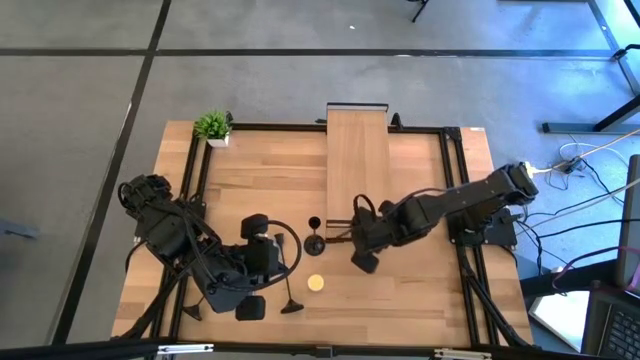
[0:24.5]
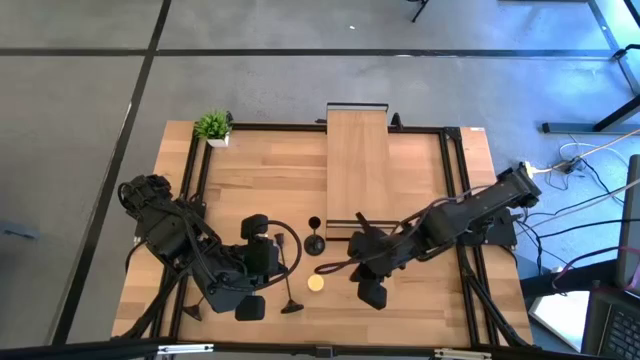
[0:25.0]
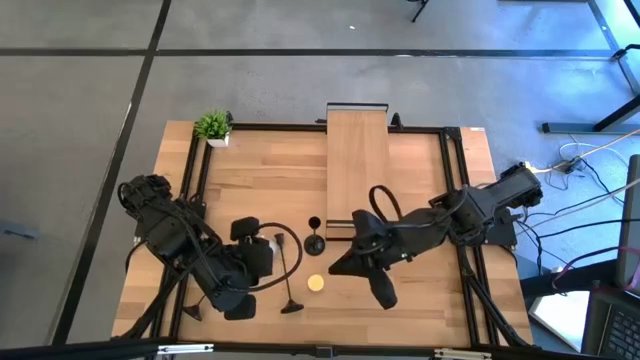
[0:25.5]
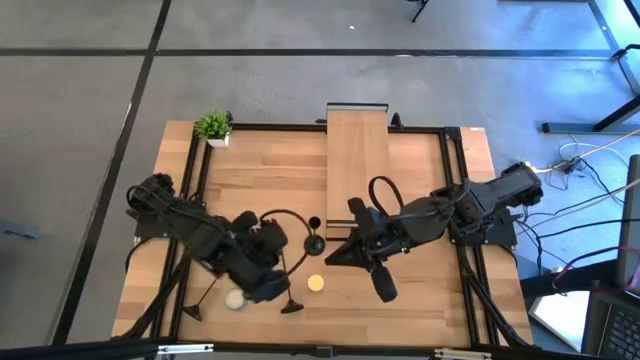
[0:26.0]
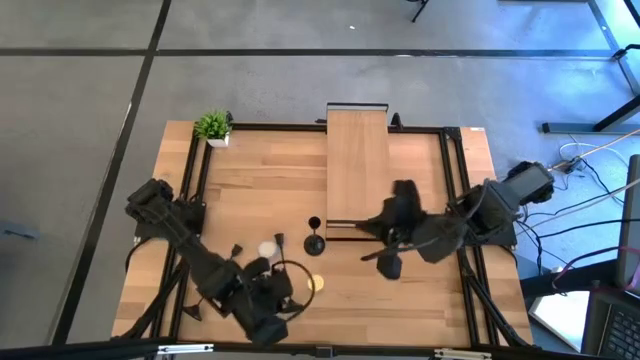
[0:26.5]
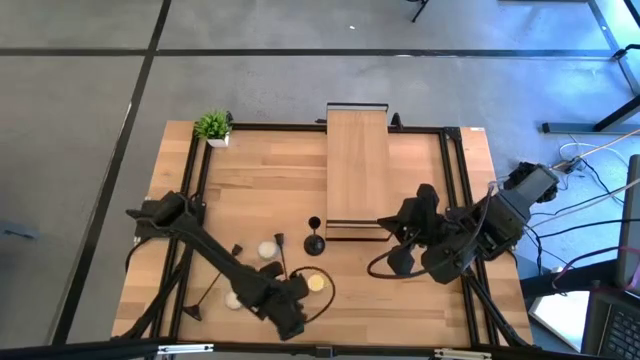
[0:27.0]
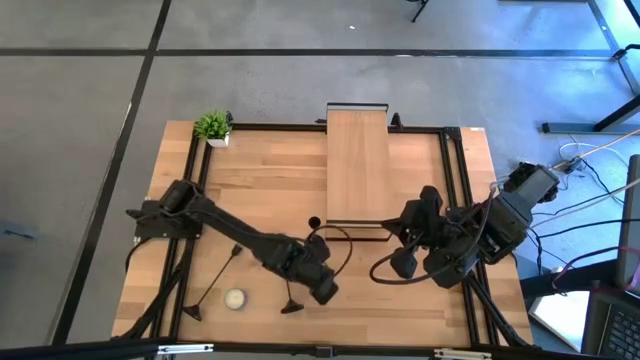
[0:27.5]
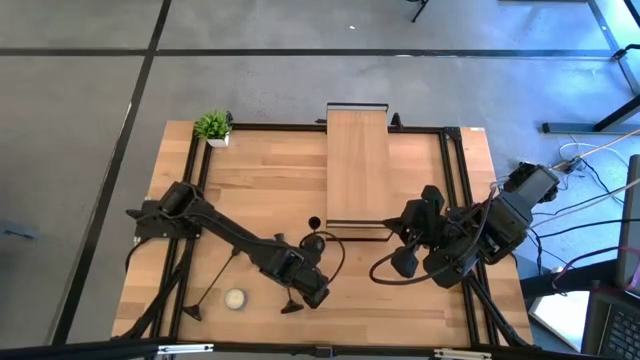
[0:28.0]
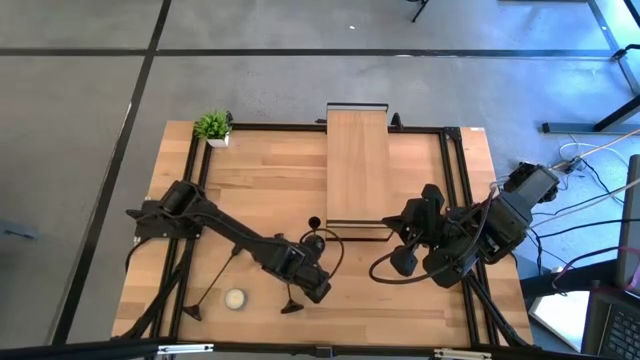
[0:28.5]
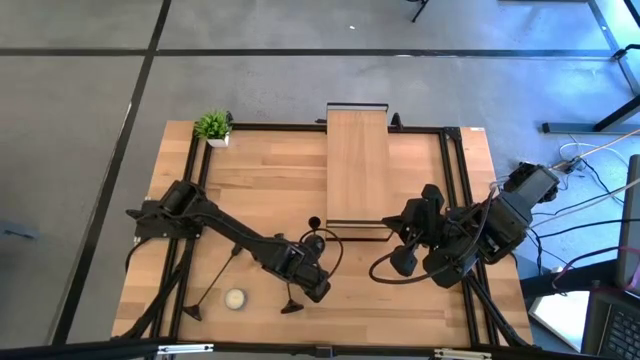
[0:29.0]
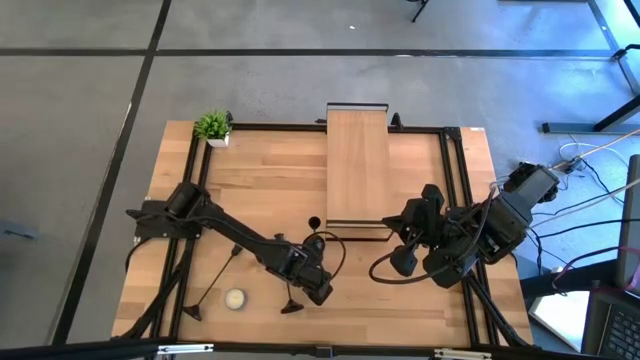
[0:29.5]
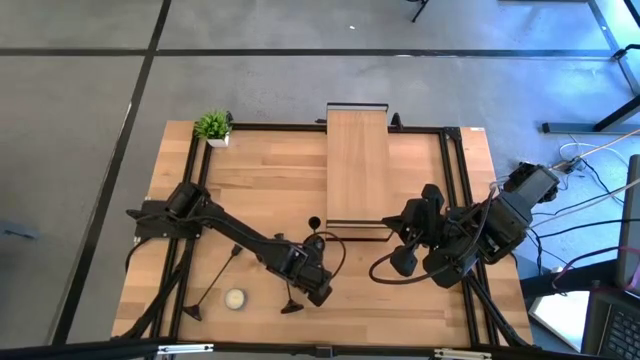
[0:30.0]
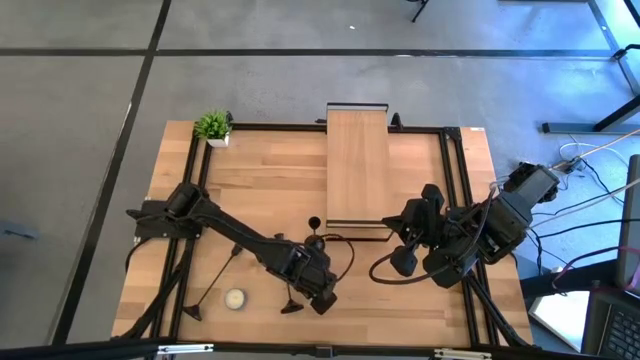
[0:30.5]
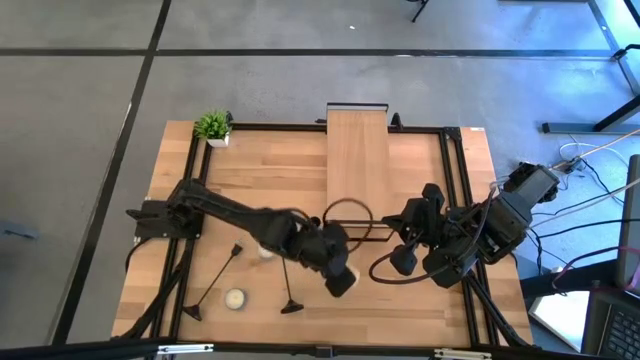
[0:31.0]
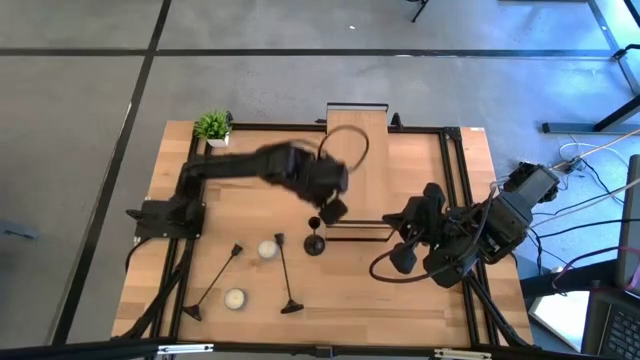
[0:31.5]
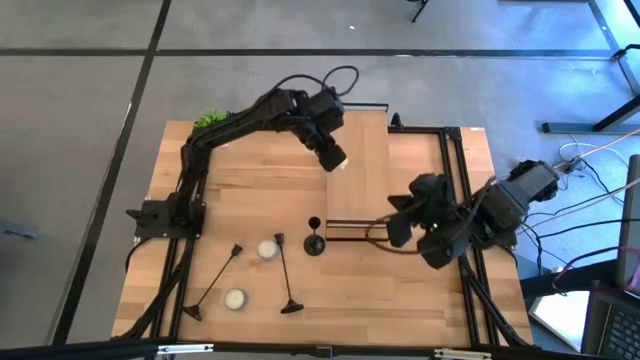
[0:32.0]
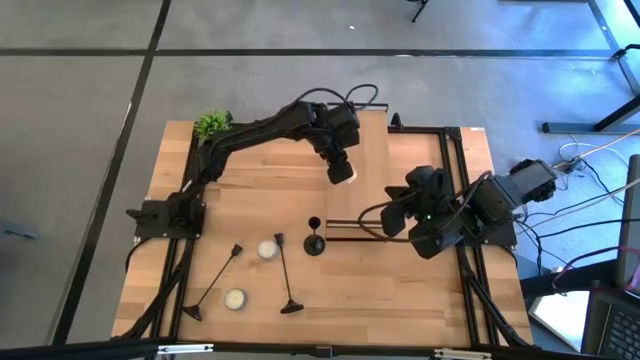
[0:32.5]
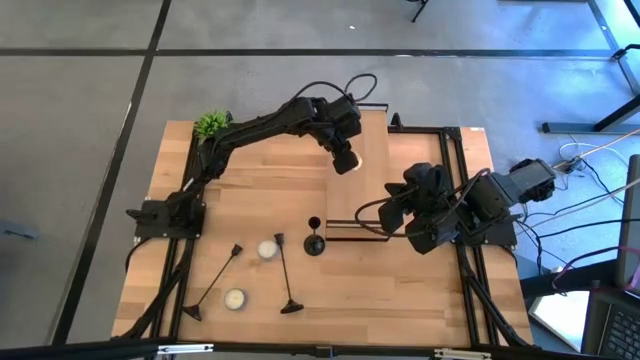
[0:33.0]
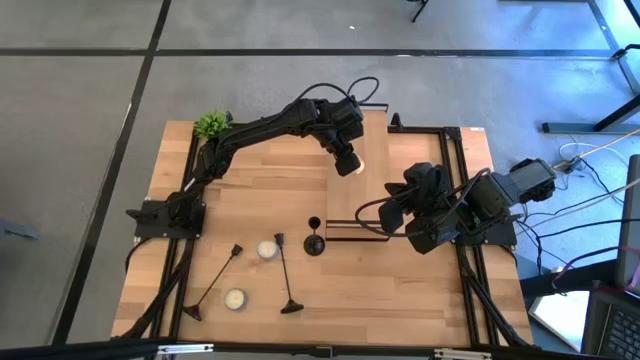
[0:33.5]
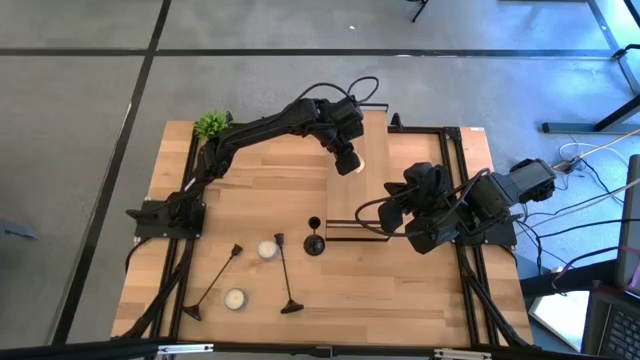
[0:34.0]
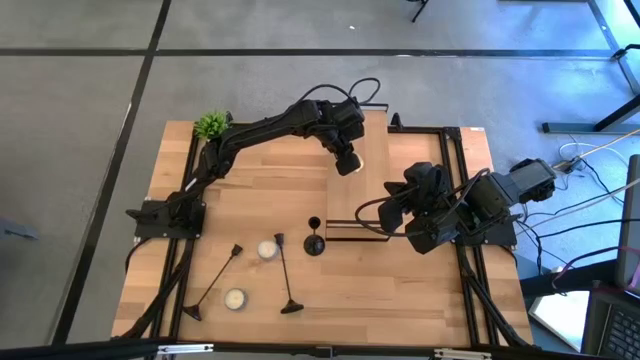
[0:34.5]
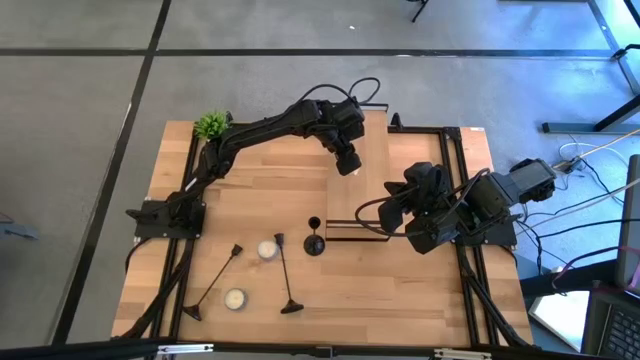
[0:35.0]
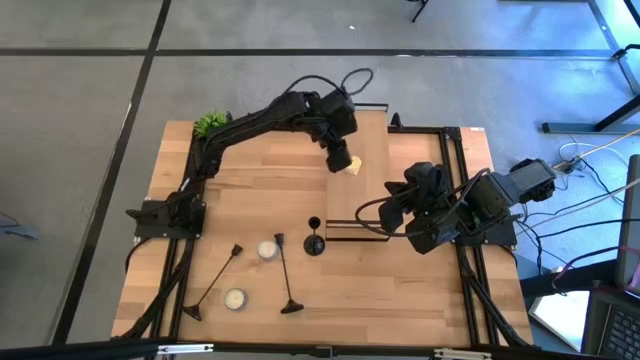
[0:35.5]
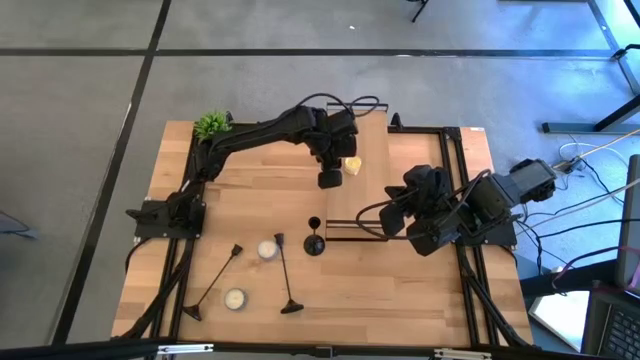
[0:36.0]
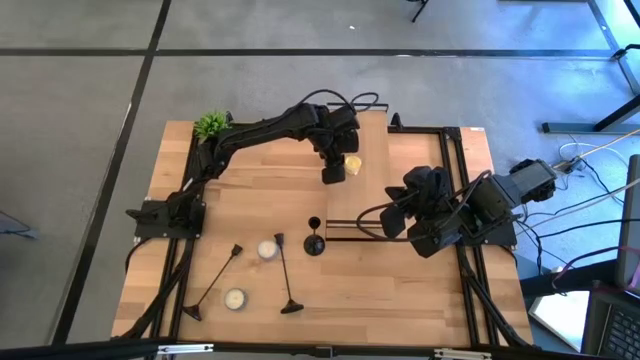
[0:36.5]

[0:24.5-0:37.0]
Task: Pick & Place candle stick holders
Put the yellow candle jar at the center of the shelf

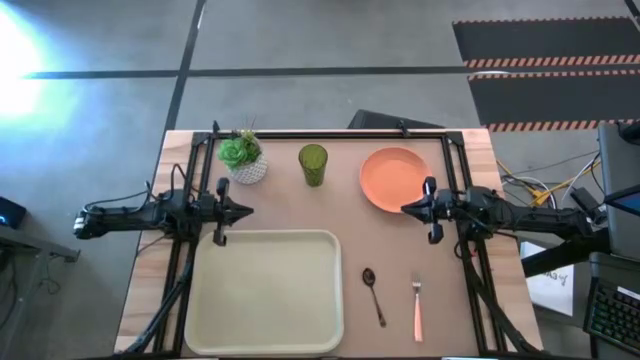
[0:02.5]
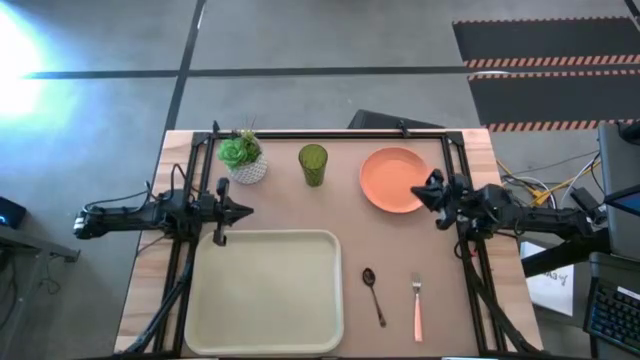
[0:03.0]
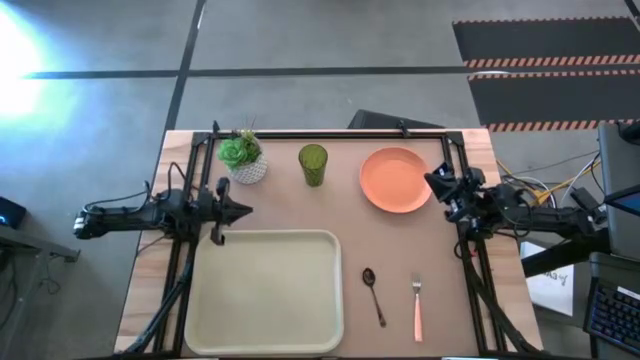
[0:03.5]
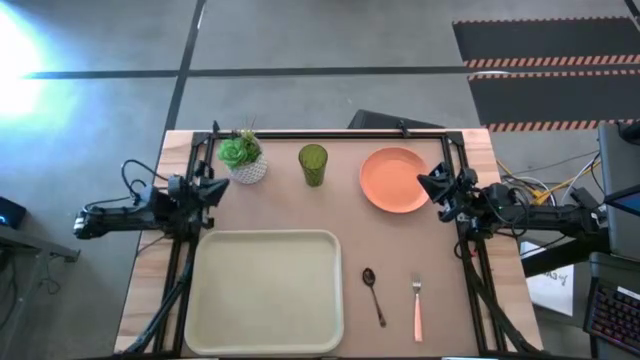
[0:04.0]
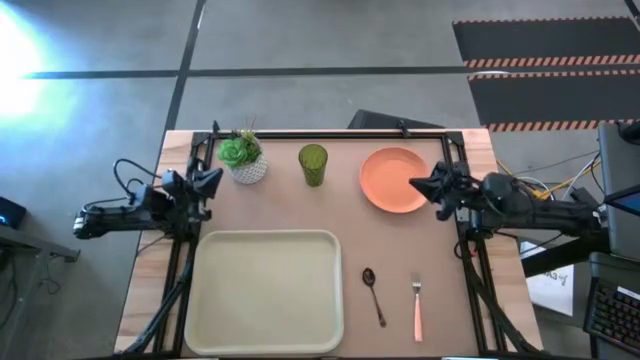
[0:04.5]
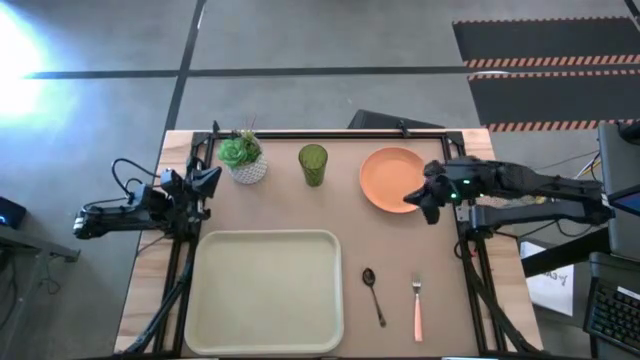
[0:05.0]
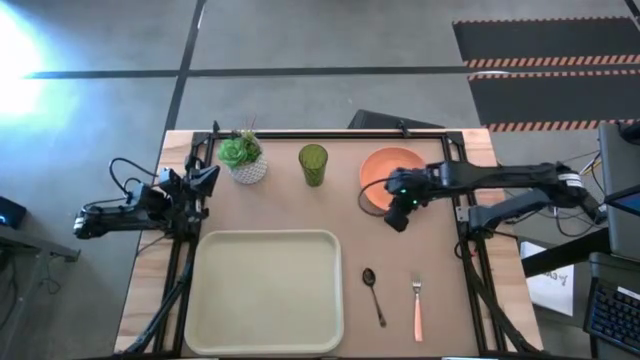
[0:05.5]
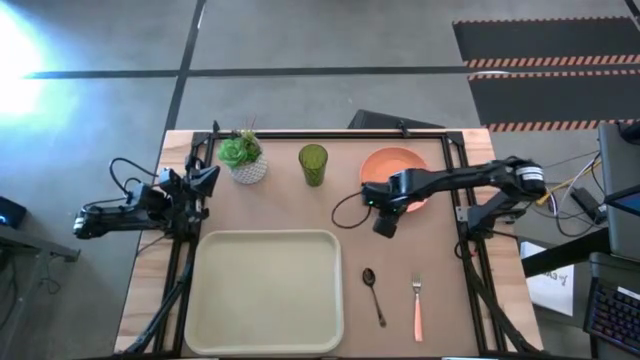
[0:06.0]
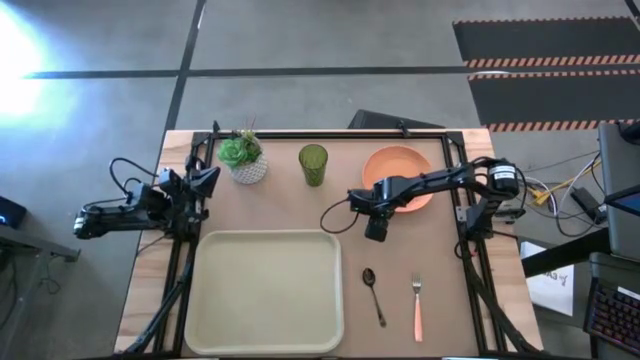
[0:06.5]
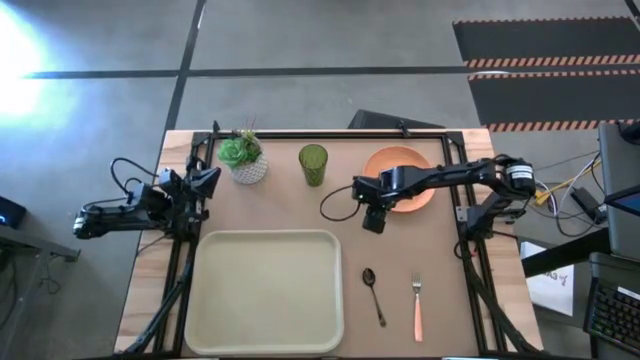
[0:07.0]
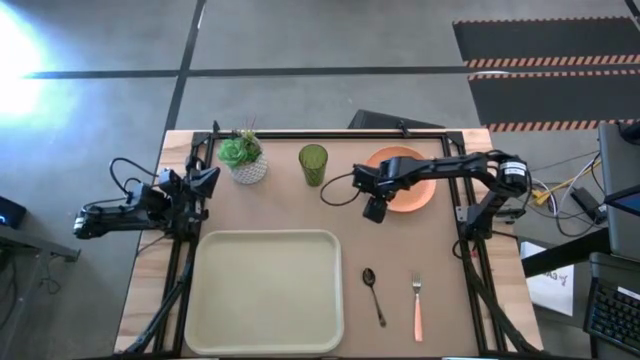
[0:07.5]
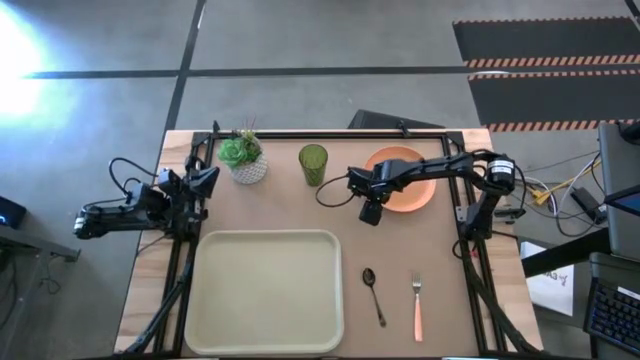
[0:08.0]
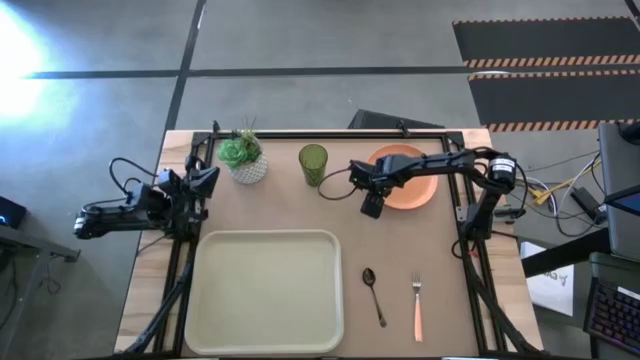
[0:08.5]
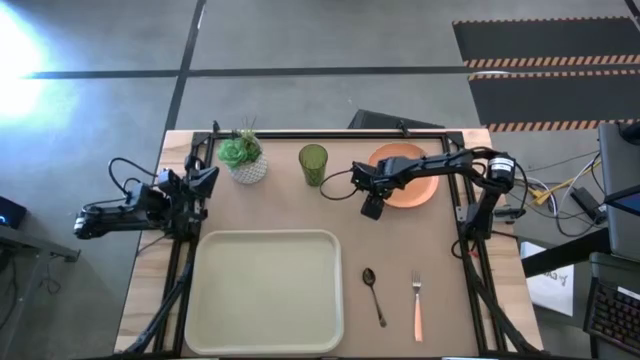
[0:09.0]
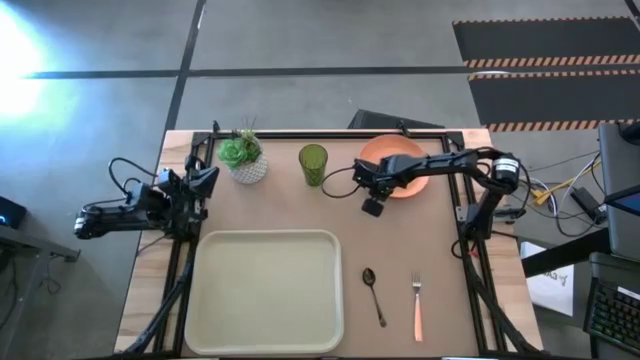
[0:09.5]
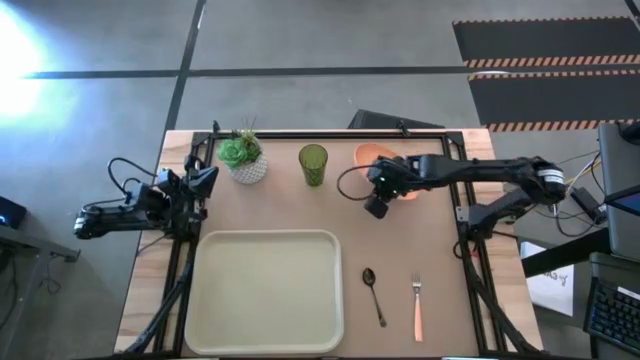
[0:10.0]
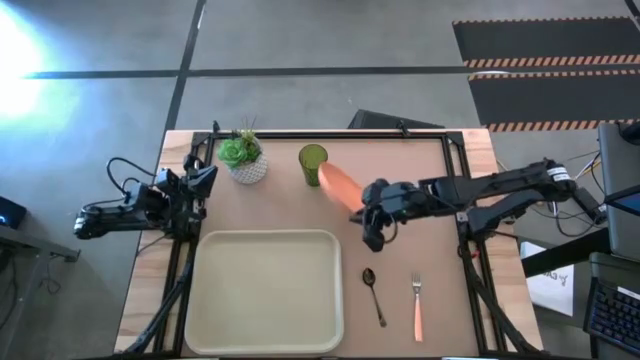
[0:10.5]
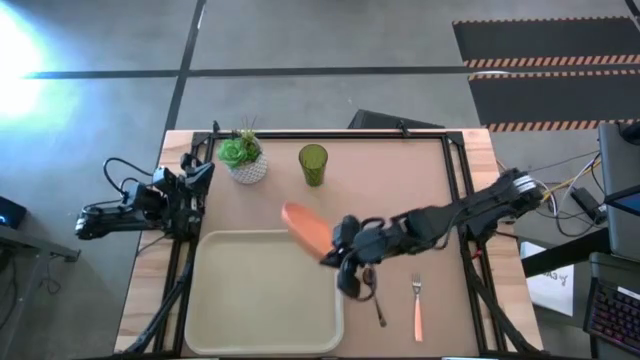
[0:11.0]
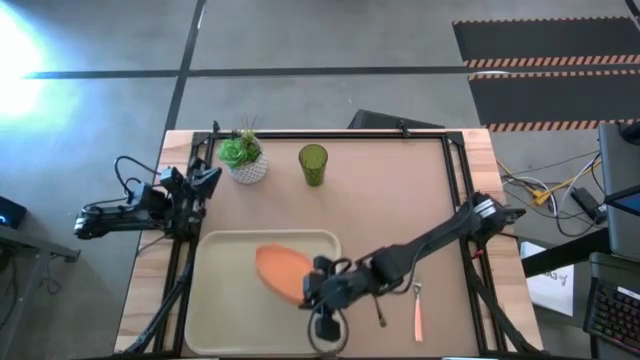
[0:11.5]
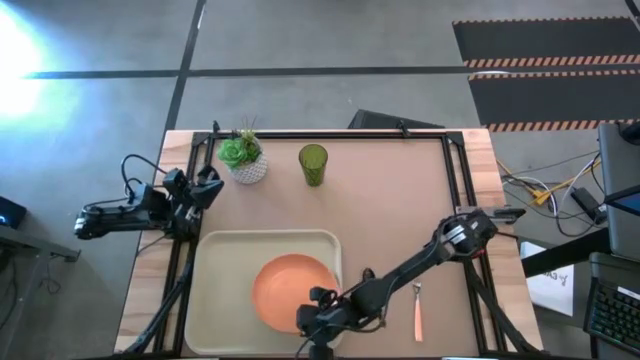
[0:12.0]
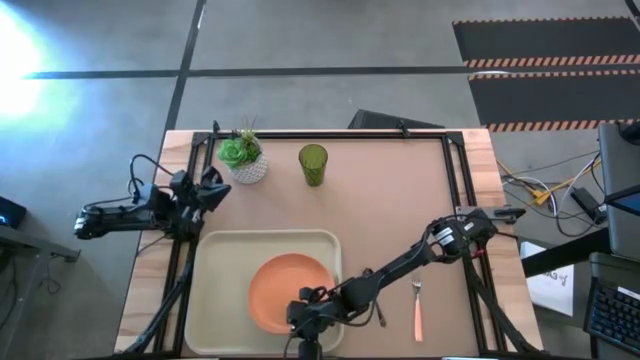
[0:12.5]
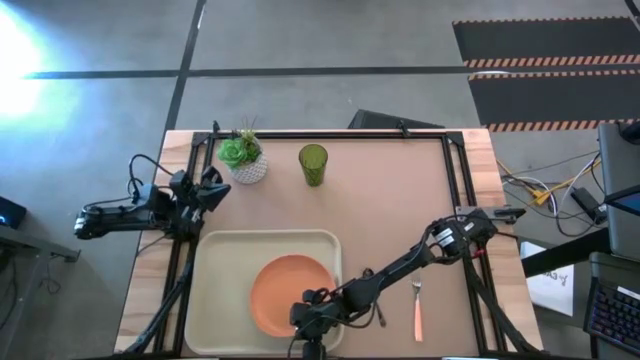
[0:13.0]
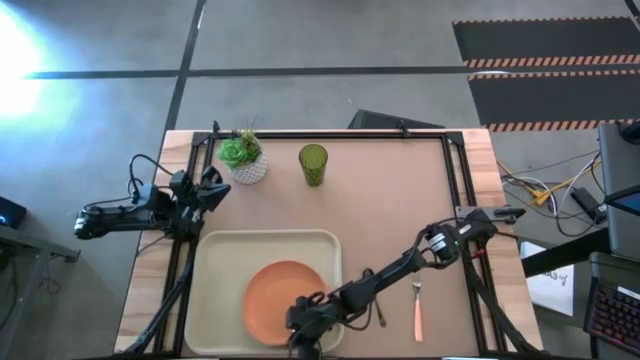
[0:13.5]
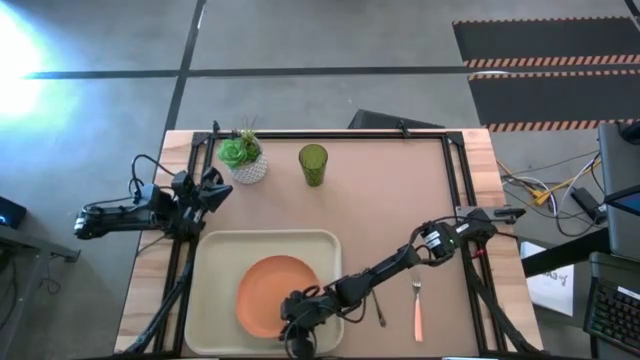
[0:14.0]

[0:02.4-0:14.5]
Task: Pick and place plate/cup/fork/spoon on tray
Put the orange plate on the right side of the white tray
